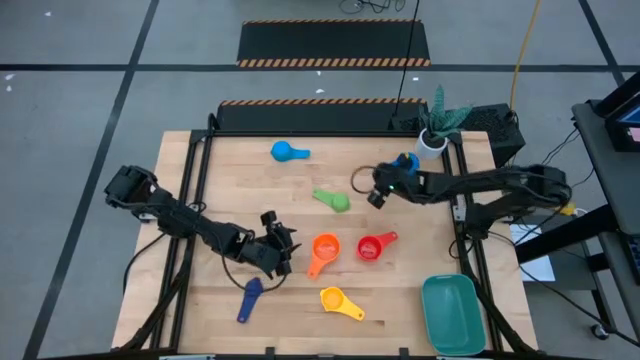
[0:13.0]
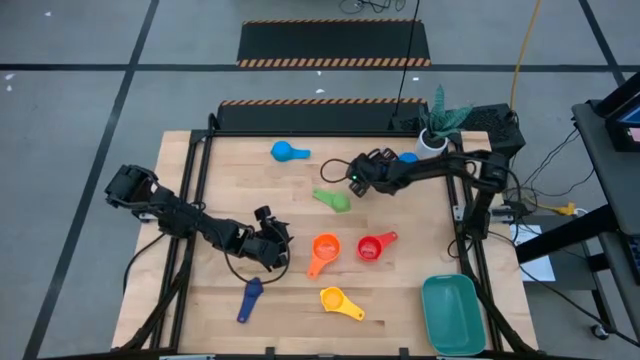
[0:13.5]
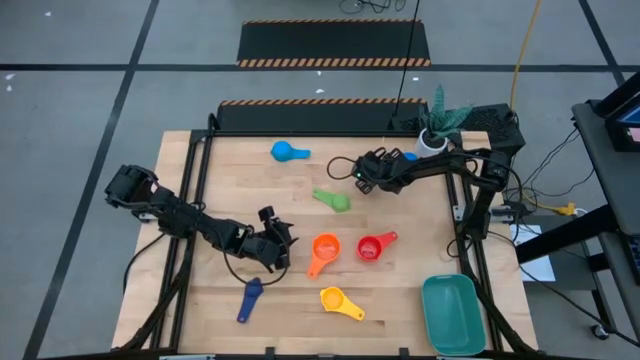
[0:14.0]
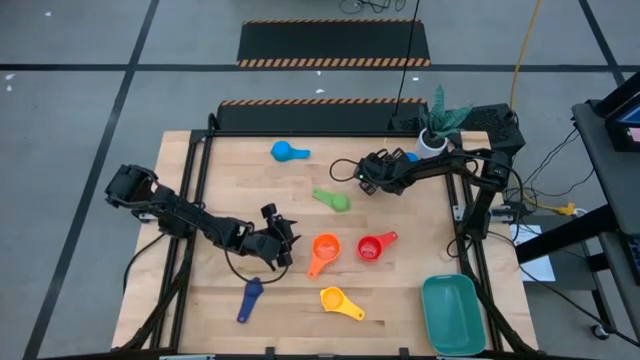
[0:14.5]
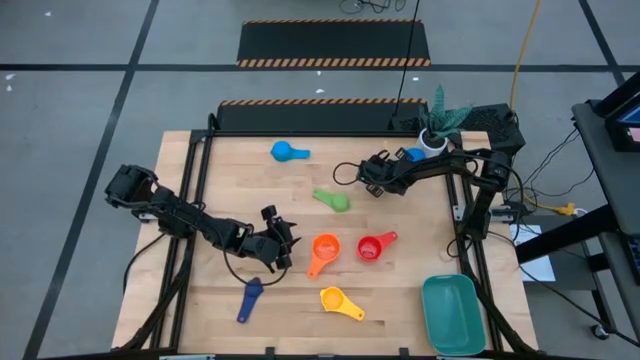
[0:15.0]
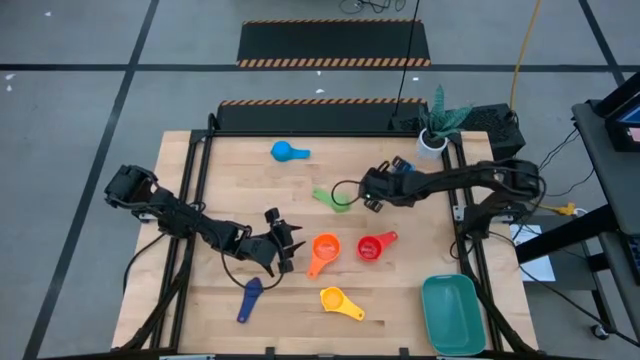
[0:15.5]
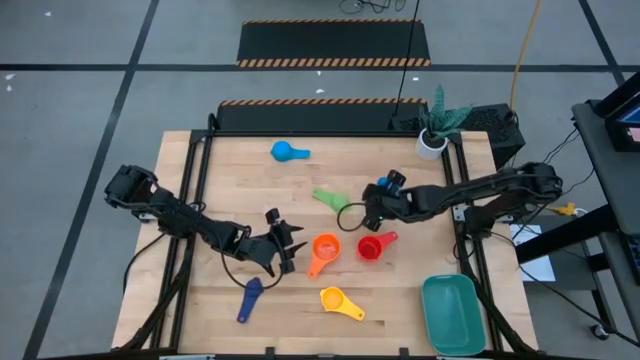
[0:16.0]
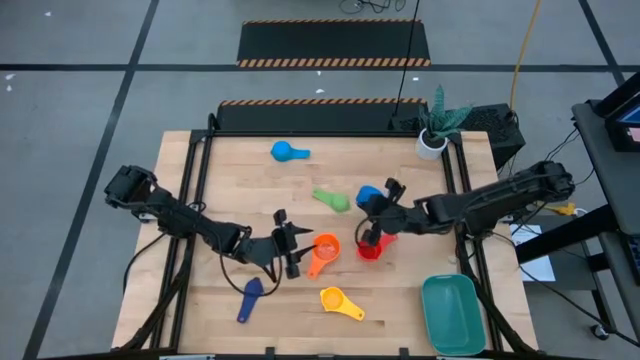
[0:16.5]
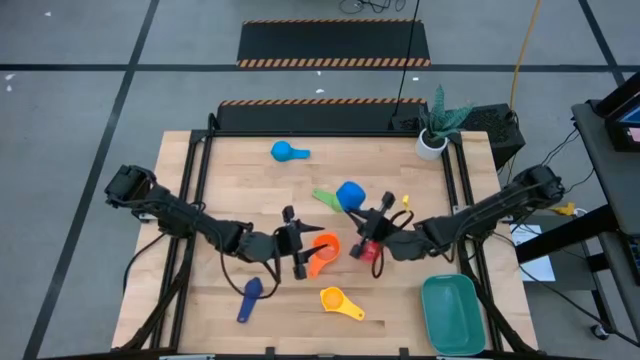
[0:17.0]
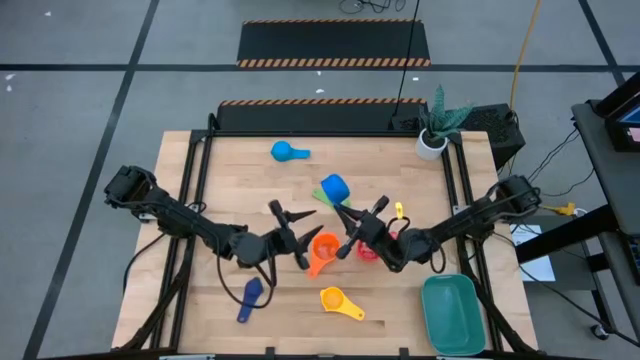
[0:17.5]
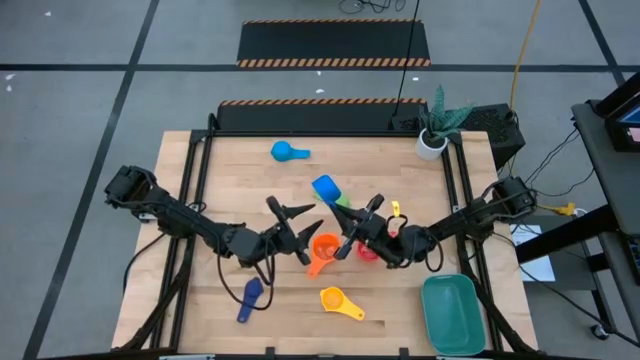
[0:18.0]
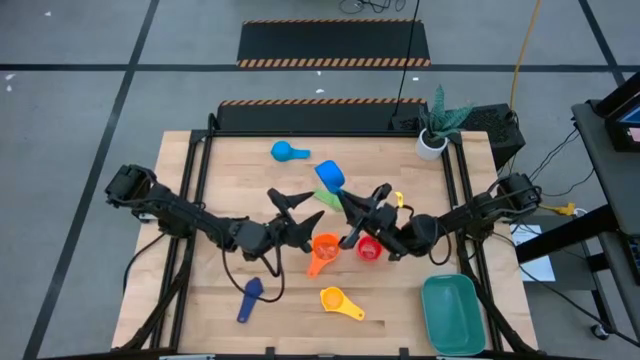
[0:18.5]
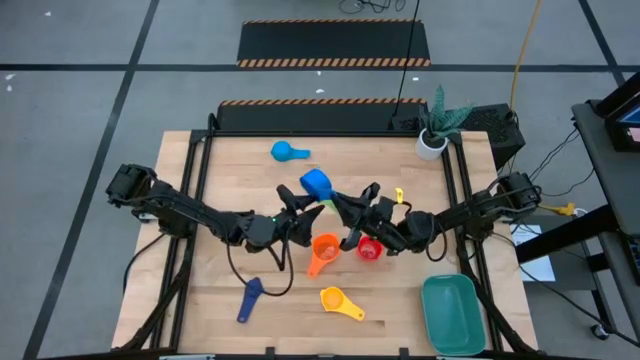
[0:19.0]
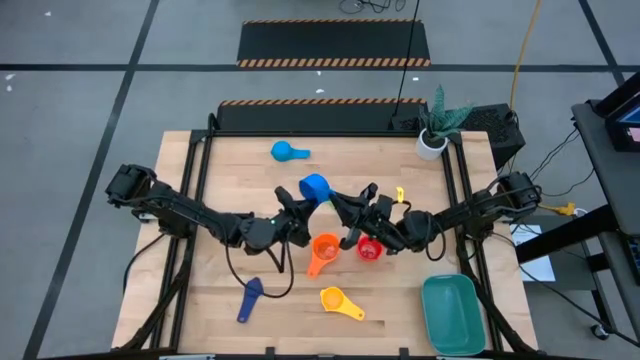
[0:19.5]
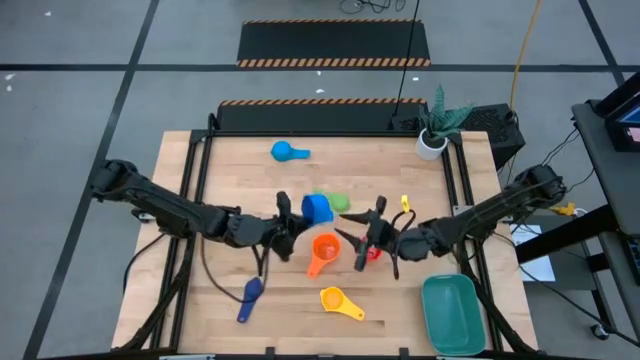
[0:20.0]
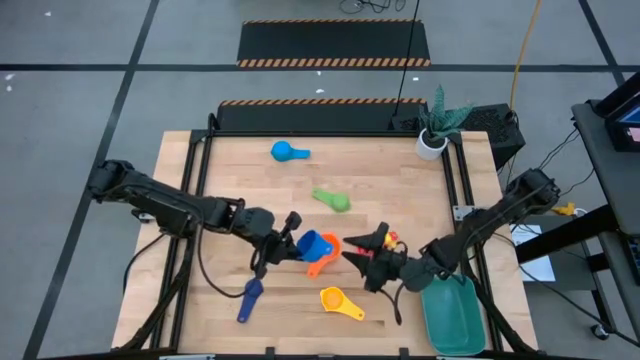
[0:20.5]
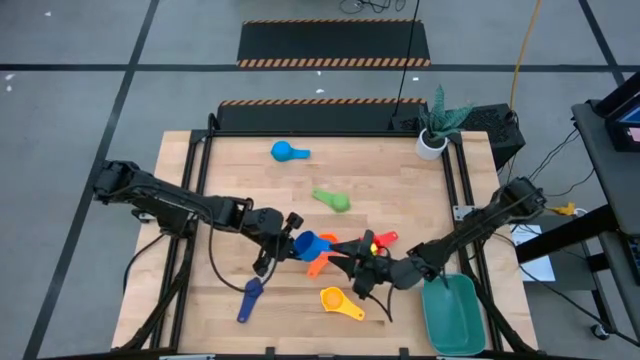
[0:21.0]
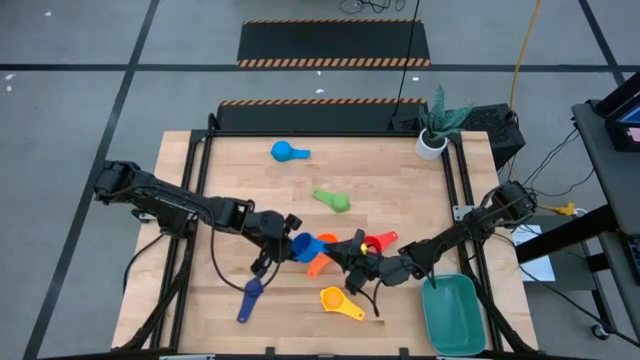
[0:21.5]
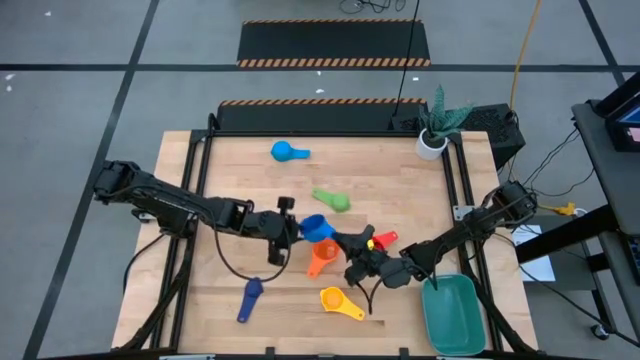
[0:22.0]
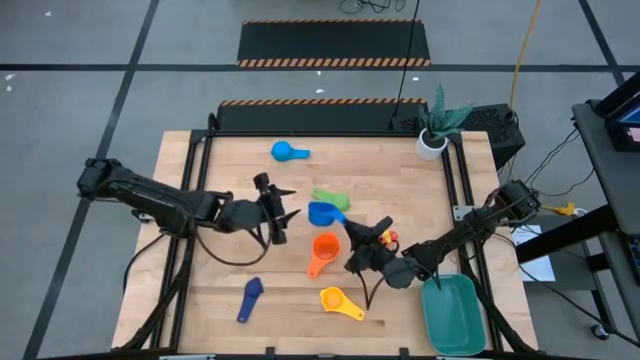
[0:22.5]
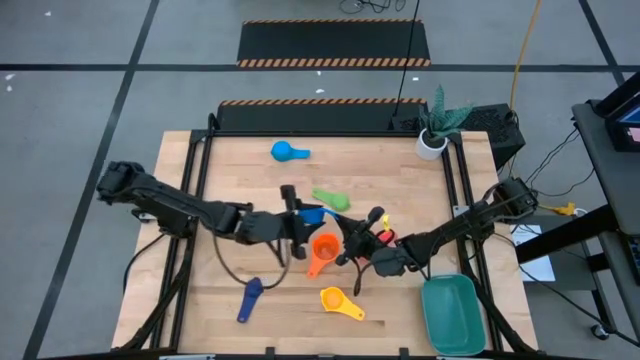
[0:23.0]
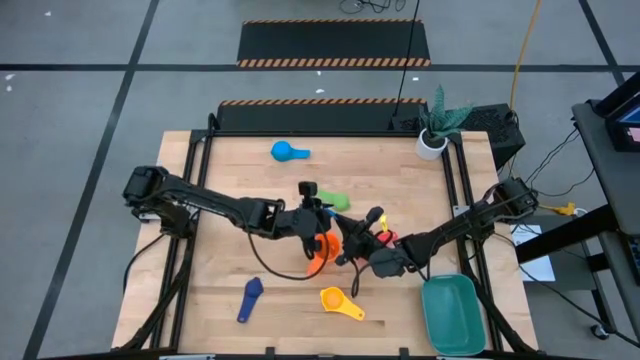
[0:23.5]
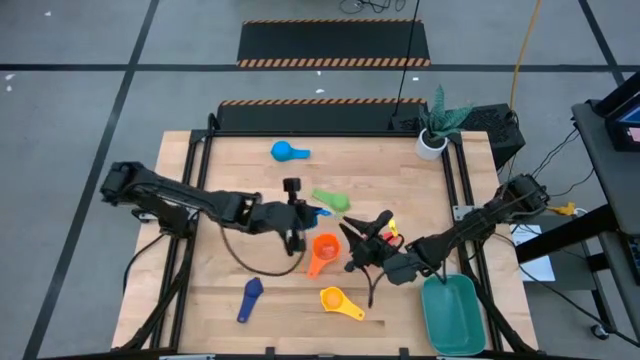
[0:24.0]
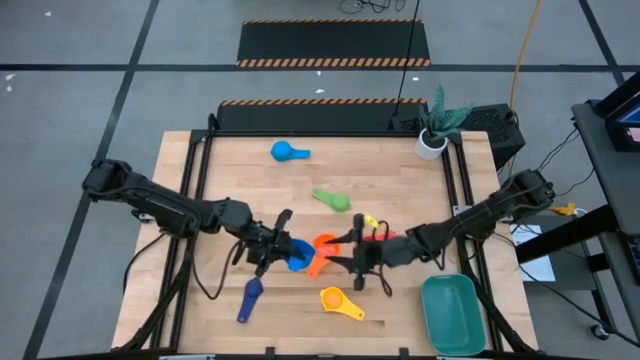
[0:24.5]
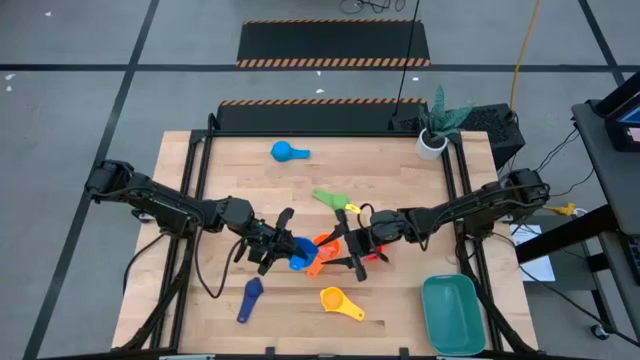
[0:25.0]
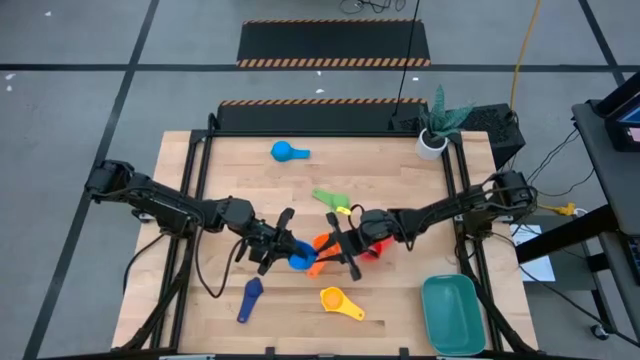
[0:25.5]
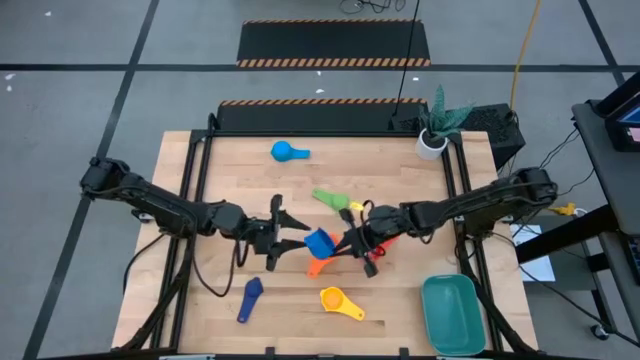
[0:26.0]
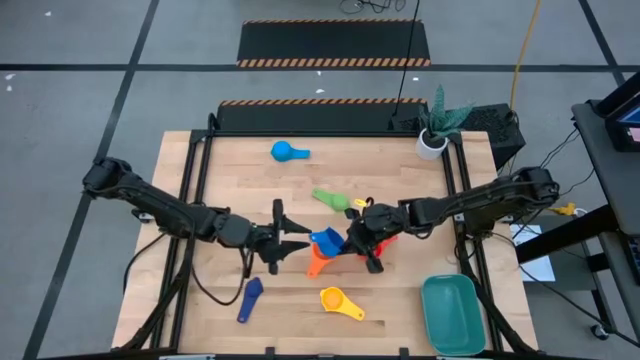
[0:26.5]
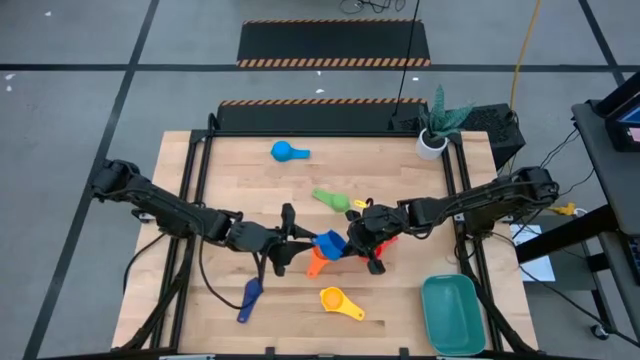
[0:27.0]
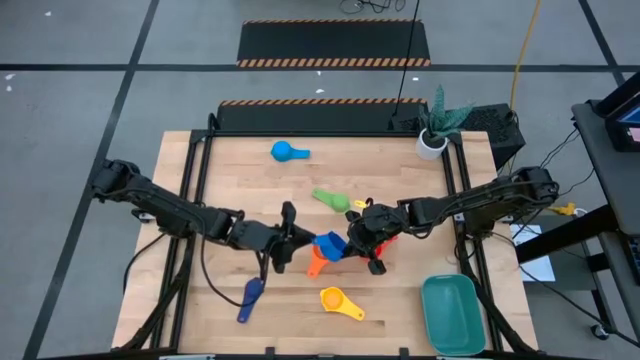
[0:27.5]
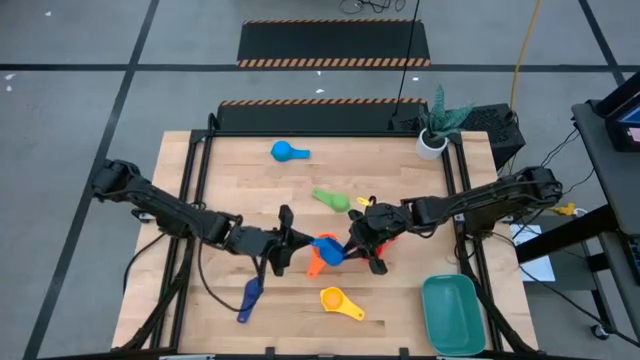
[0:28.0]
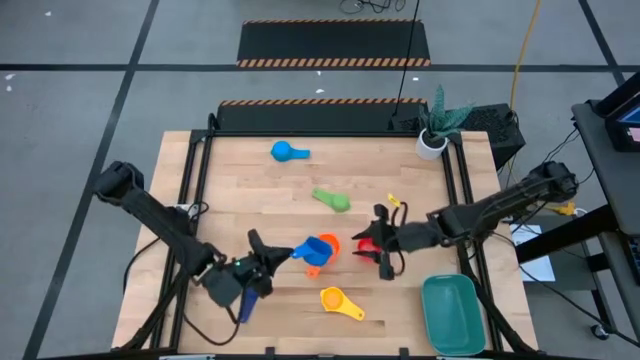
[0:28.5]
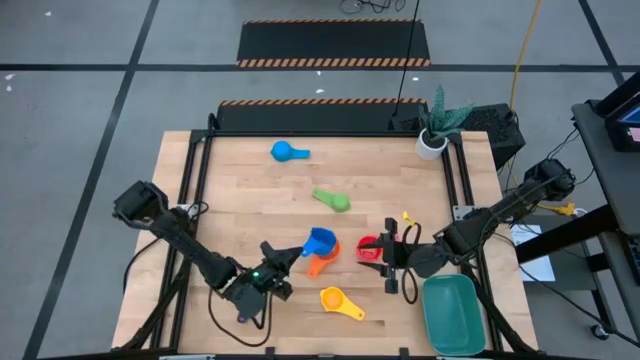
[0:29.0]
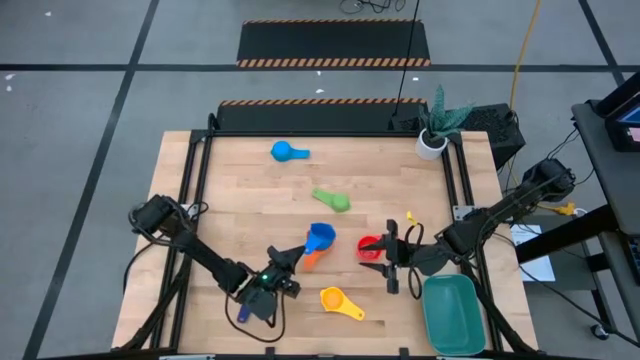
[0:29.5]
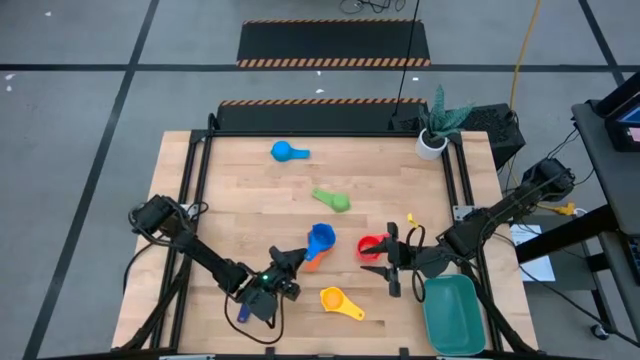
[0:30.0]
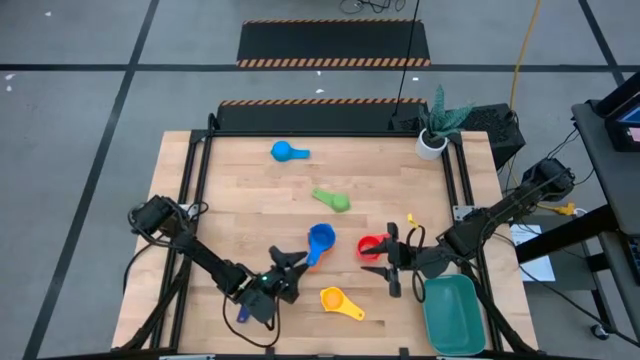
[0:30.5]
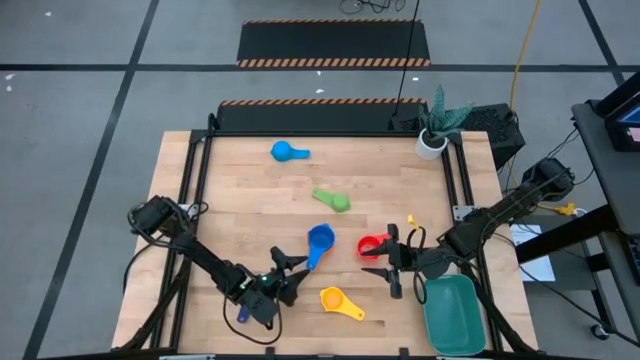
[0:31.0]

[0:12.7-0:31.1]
Task: Nest measuring cups in basket
Stack the blue measuring cup on top of the orange measuring cup

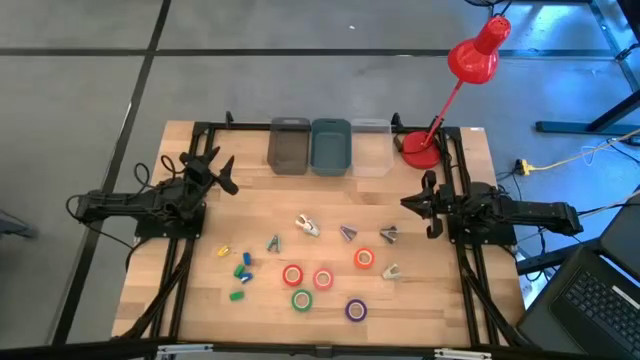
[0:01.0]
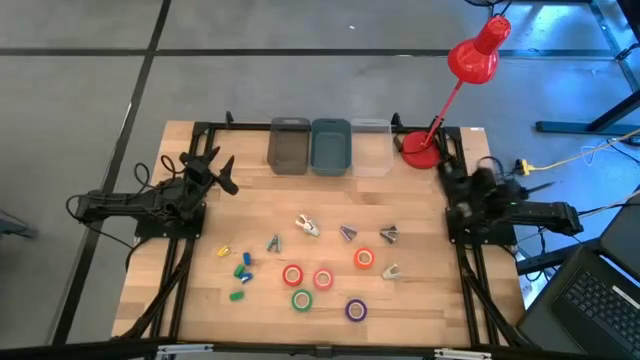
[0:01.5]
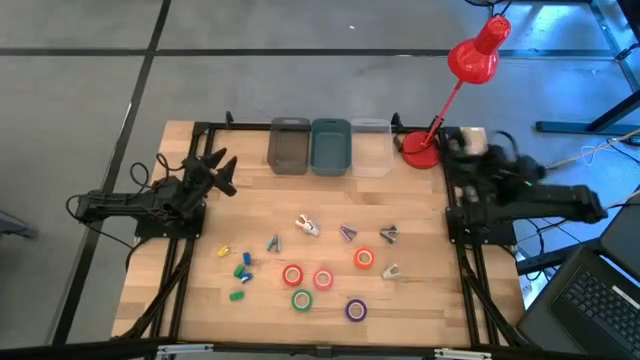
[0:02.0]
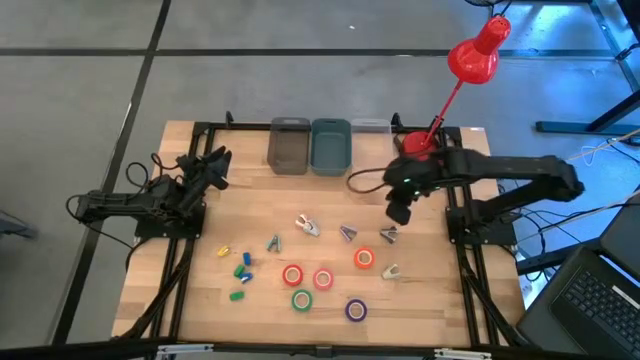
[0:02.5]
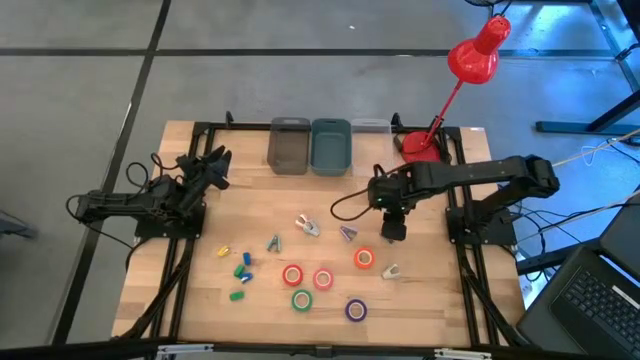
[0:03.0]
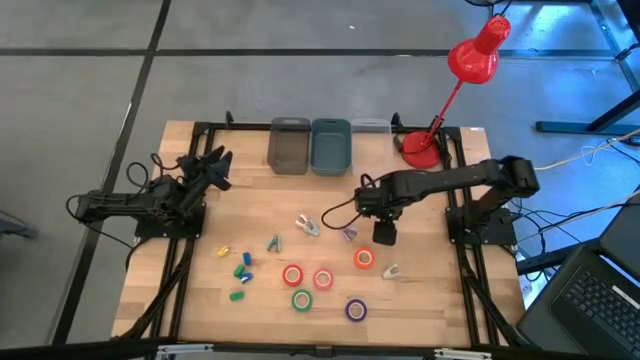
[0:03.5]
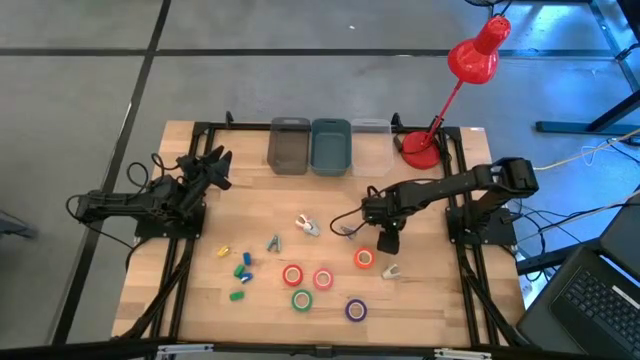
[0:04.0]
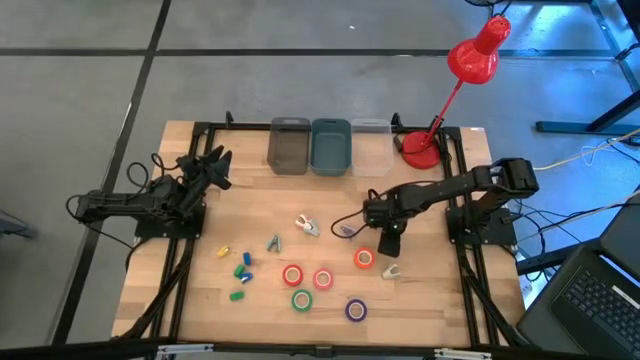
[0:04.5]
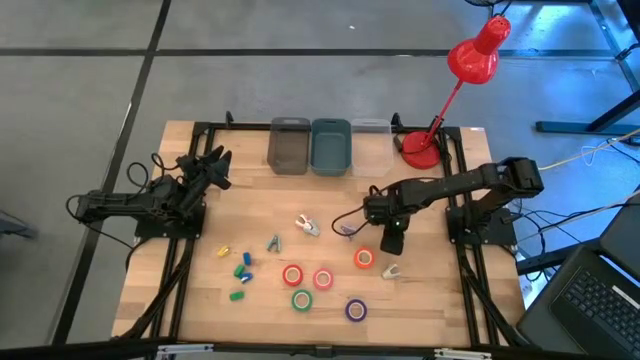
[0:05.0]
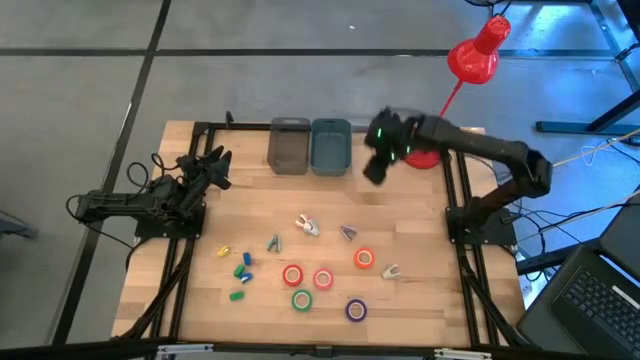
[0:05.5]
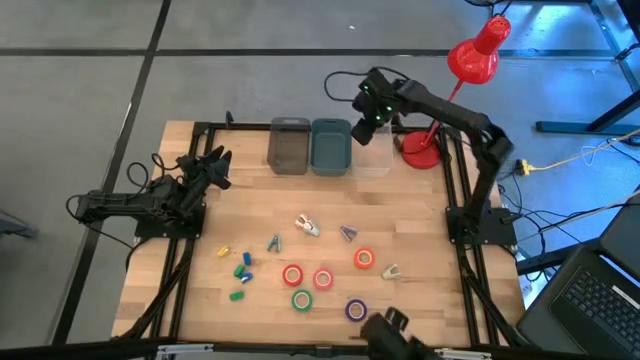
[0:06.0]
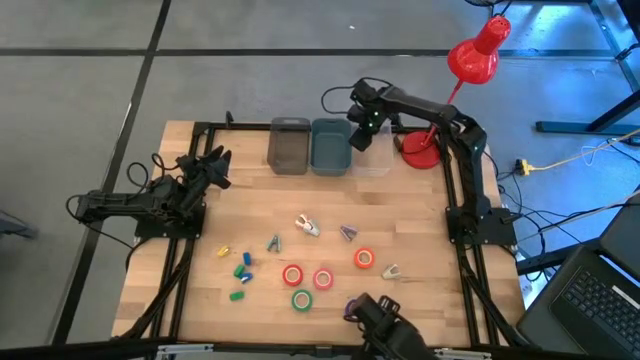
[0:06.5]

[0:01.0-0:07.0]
Task: Pick and place Stapler, Stapler remover, tape
Put the black staple remover into the transparent bin
